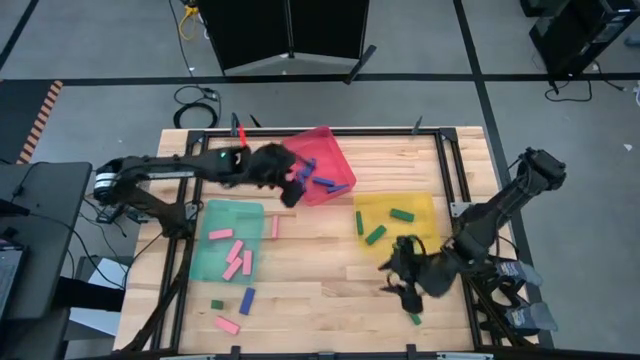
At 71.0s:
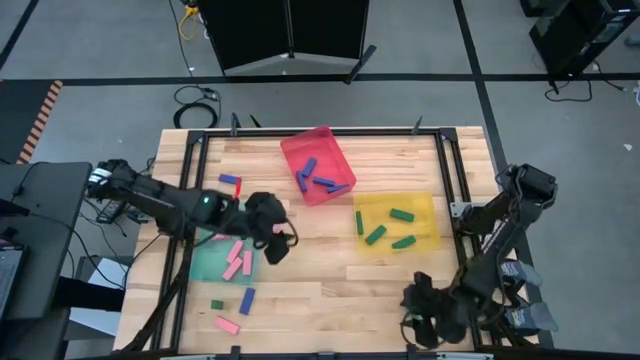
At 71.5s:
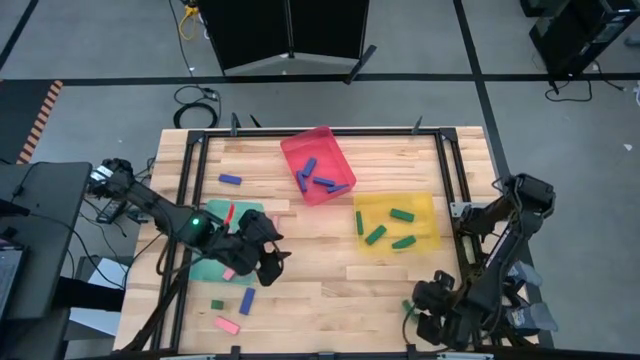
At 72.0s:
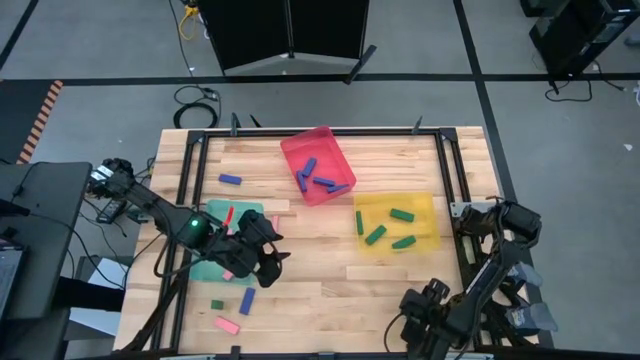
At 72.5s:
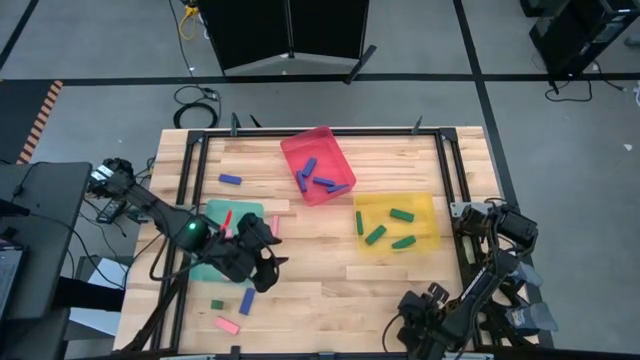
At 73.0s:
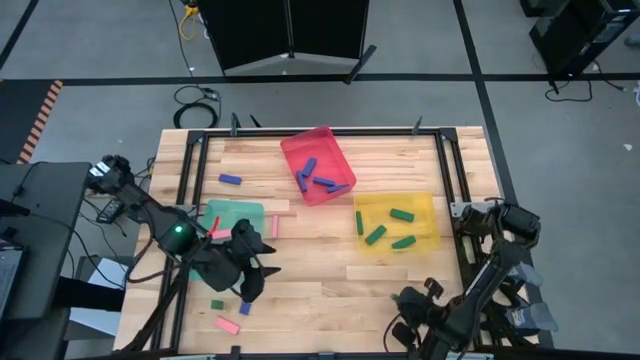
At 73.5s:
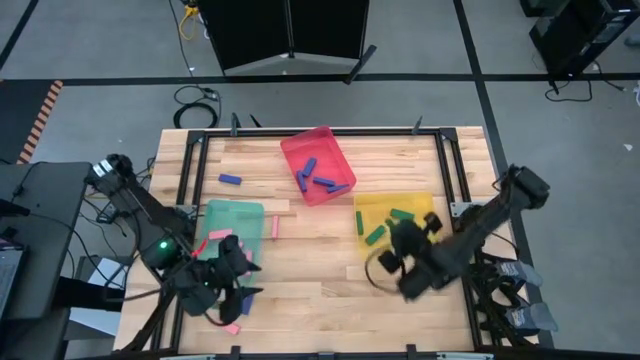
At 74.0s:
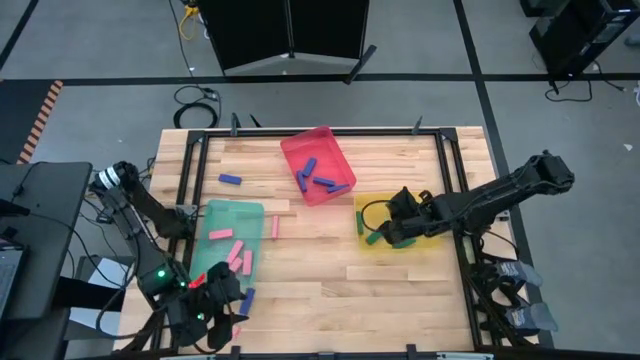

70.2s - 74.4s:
Task: Sort blocks
Put the green block into the yellow bin

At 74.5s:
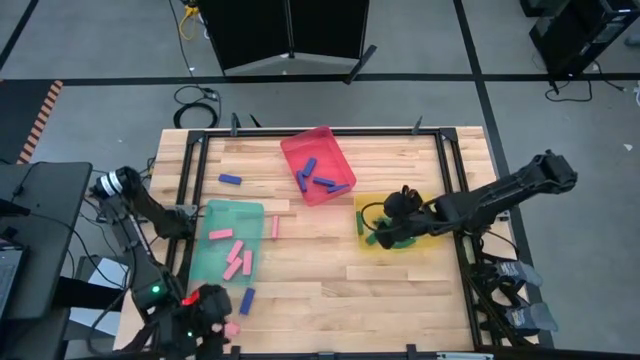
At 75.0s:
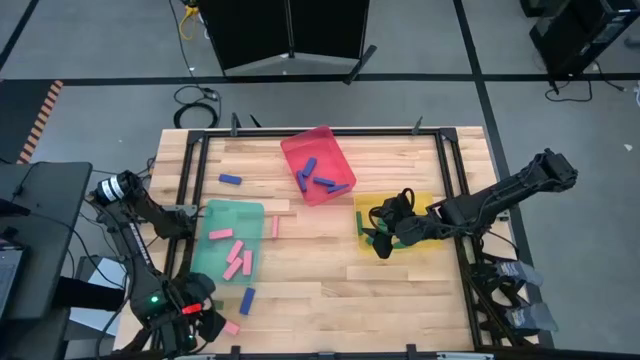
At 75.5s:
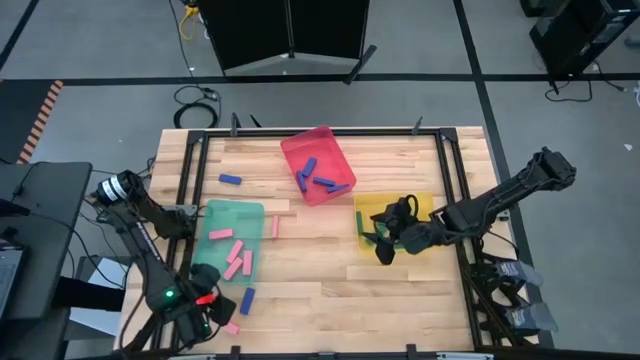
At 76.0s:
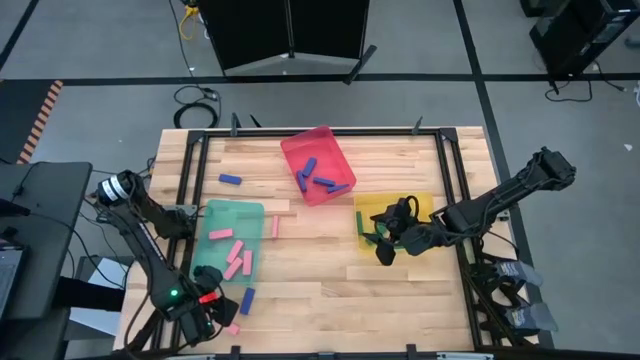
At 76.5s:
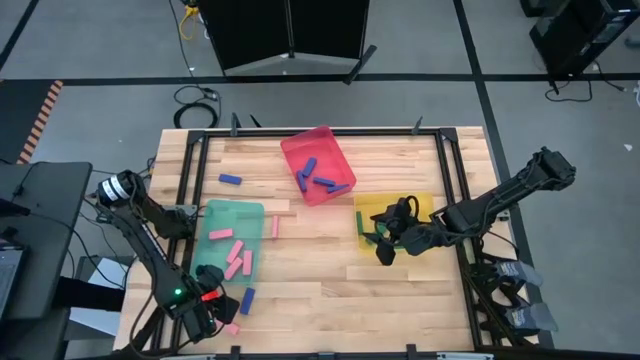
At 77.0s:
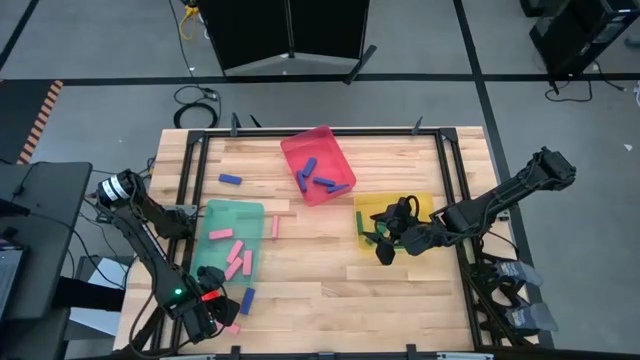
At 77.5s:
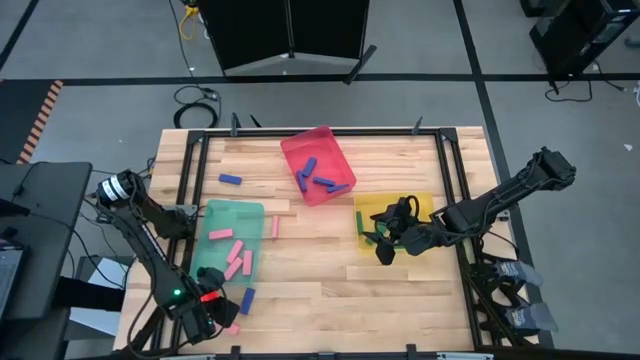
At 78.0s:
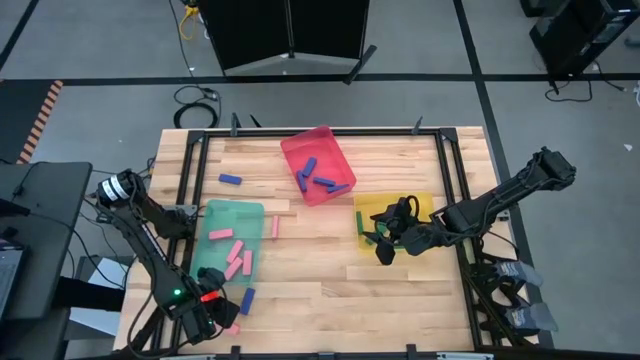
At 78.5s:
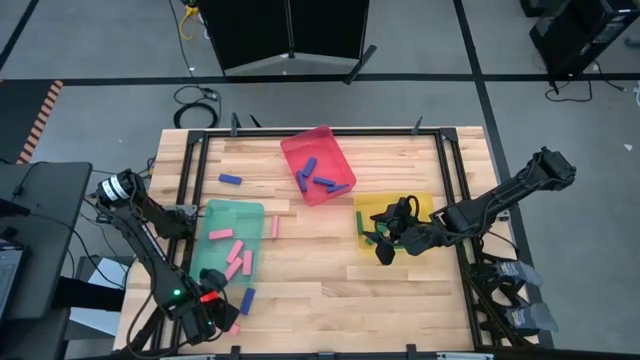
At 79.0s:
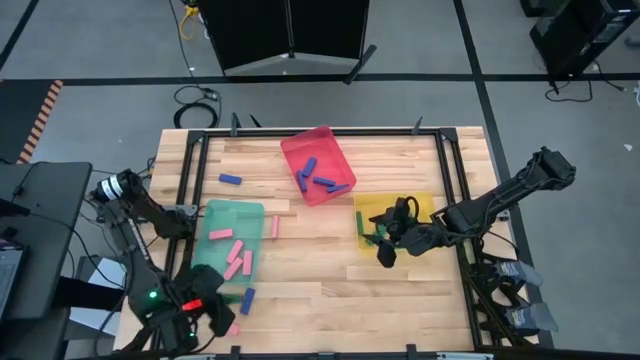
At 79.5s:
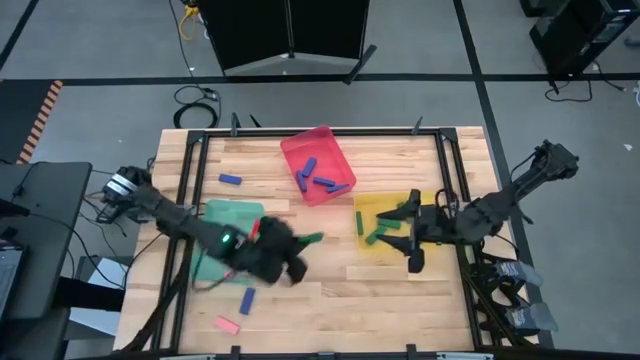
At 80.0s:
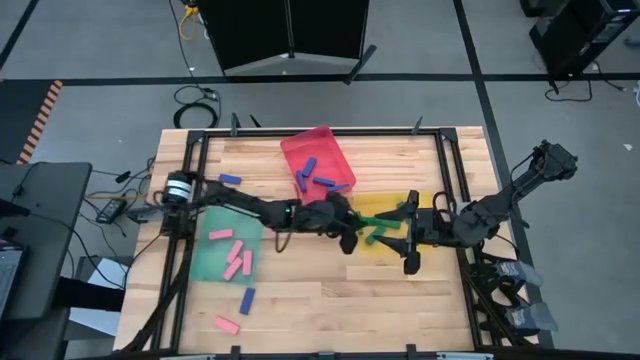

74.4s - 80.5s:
Put the green block into the yellow bin

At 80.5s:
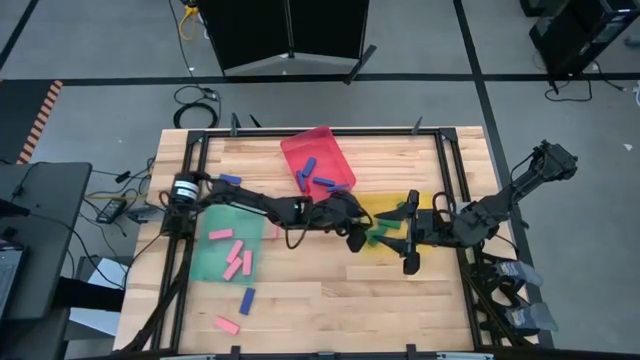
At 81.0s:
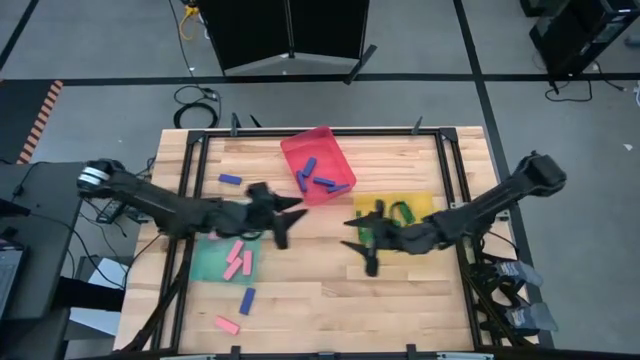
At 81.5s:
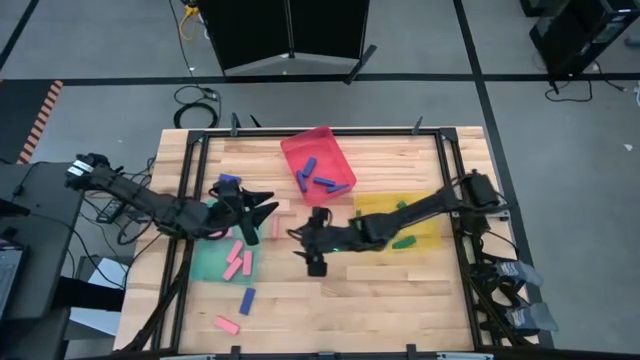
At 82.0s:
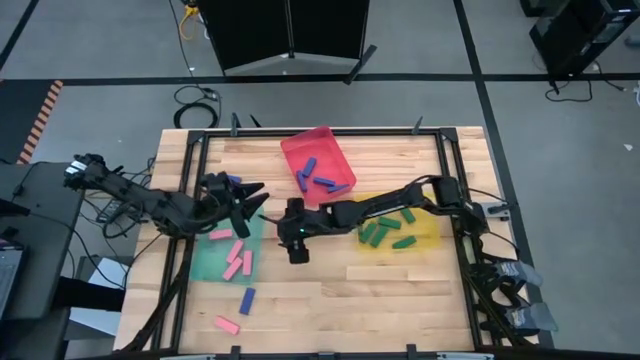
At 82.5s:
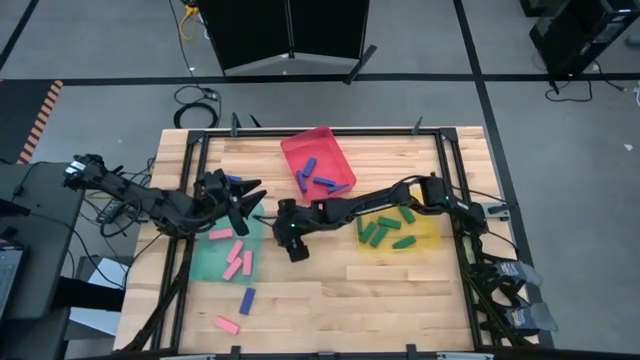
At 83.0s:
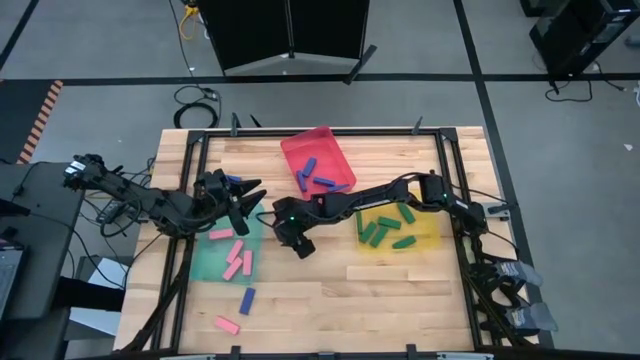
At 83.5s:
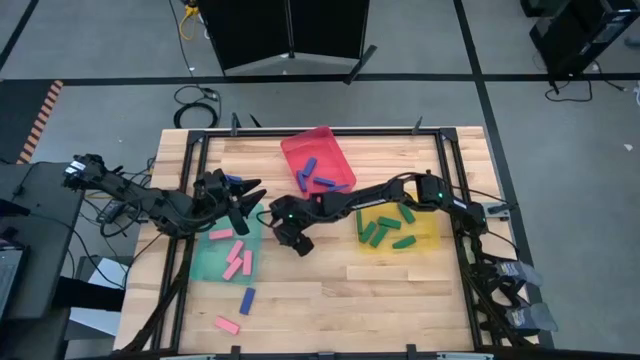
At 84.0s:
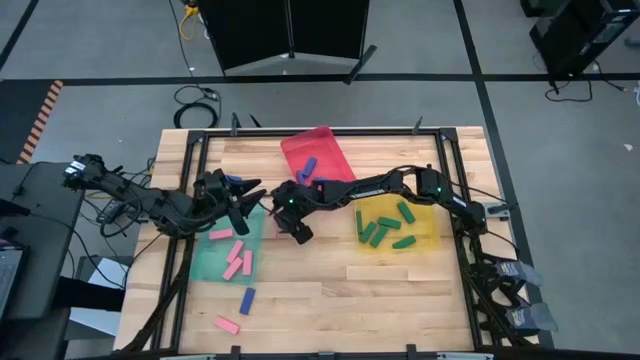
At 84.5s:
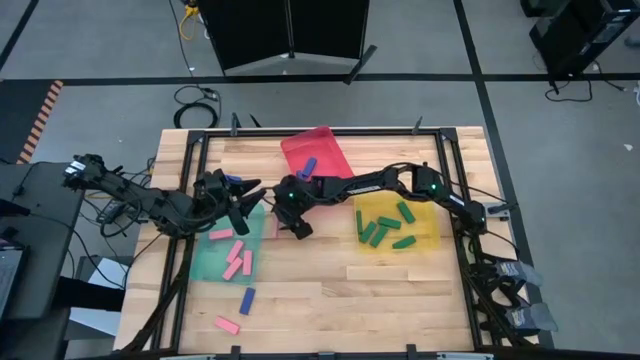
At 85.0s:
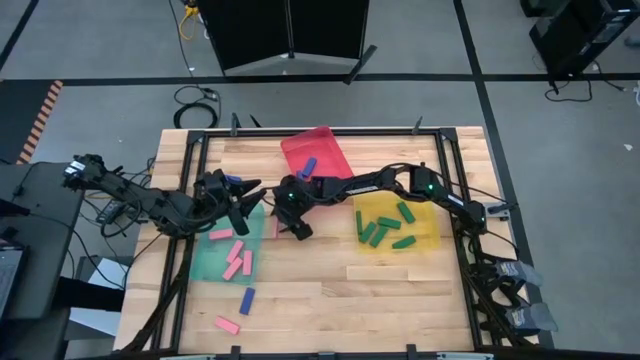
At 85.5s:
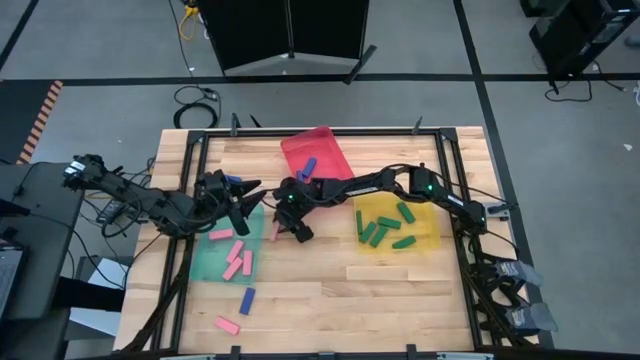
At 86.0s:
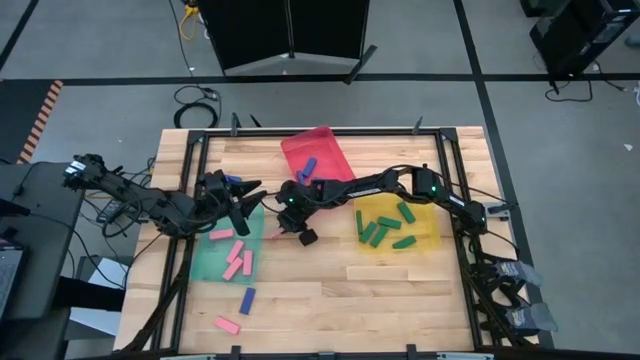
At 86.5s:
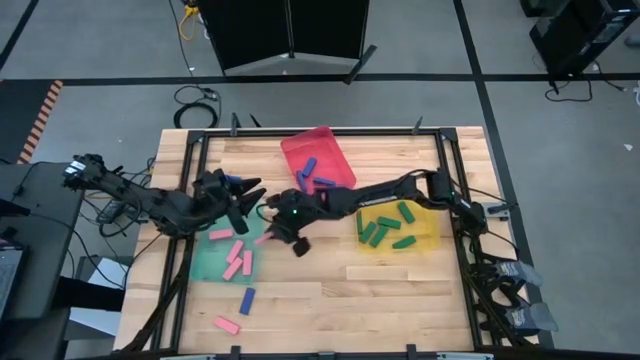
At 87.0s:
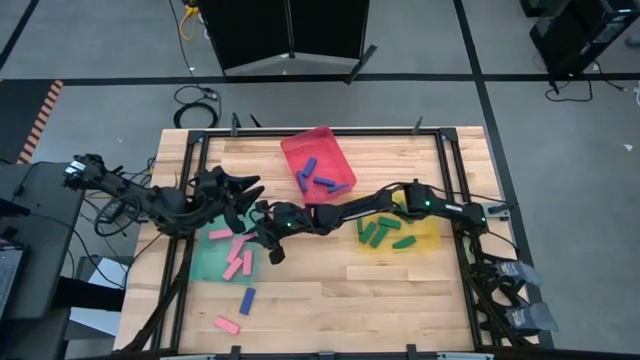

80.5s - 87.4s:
Put the pink block into the green bin

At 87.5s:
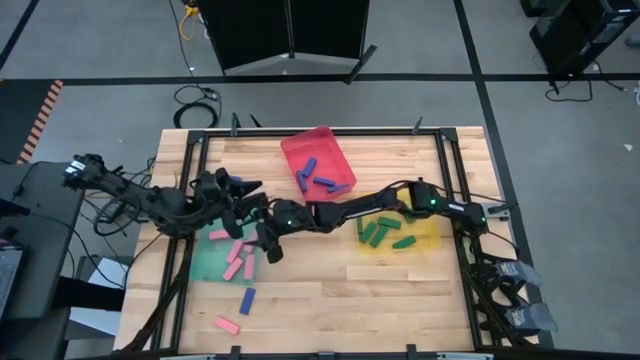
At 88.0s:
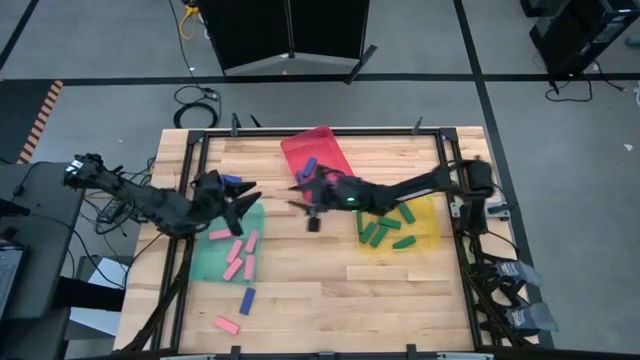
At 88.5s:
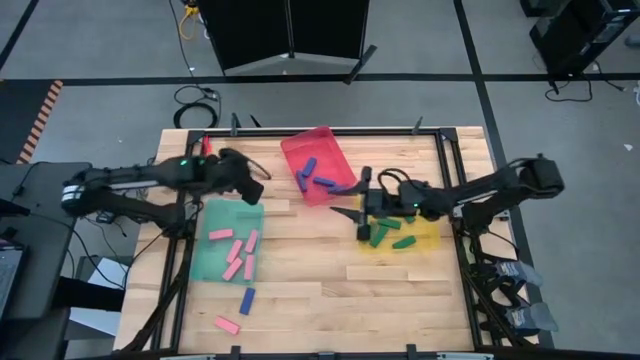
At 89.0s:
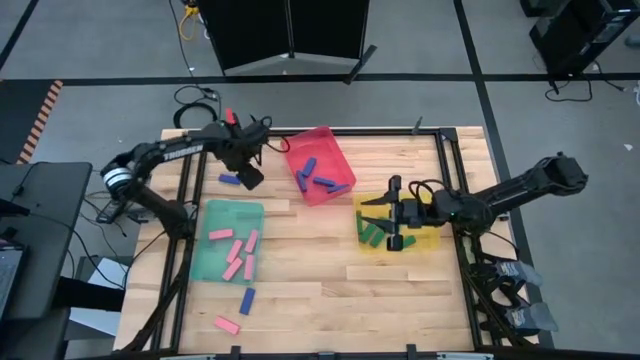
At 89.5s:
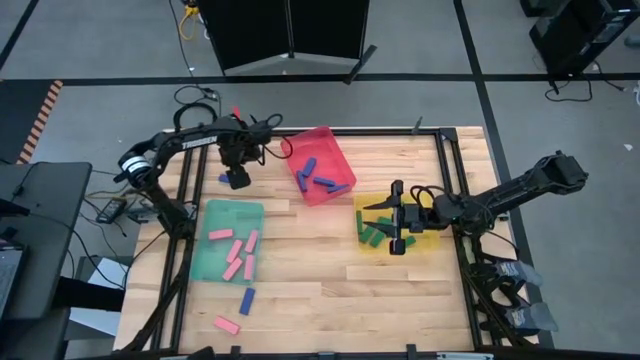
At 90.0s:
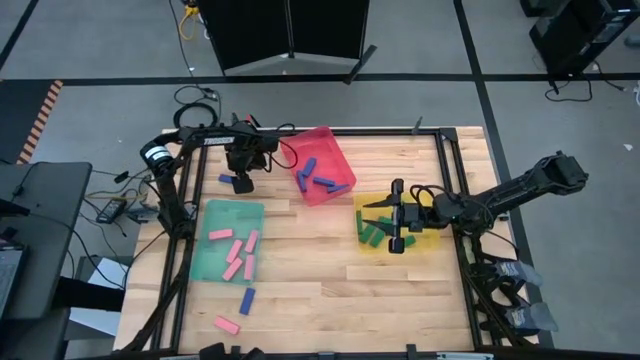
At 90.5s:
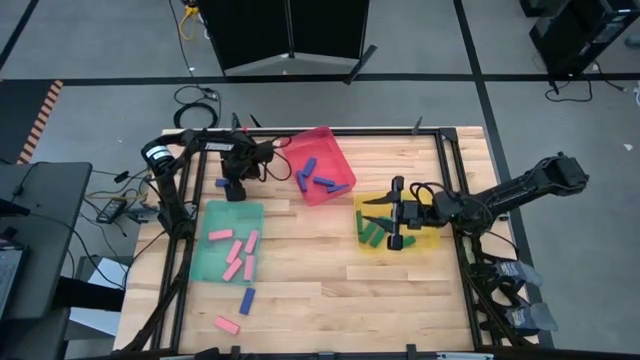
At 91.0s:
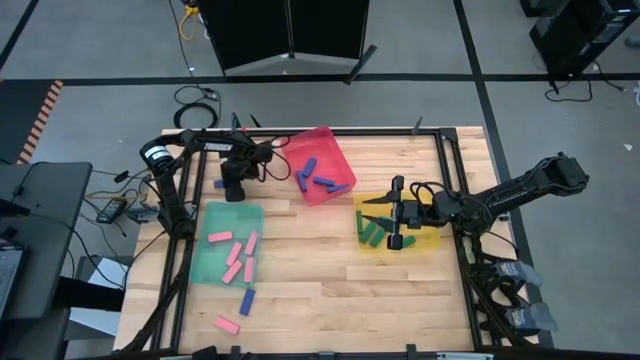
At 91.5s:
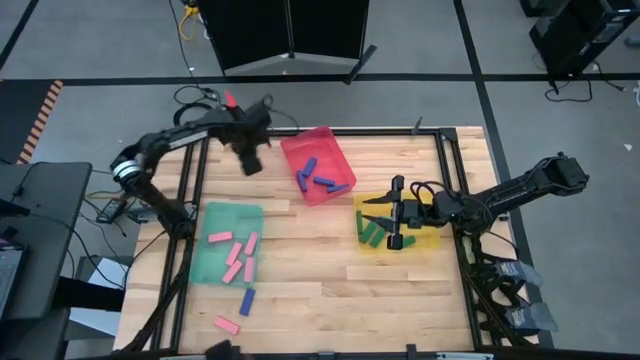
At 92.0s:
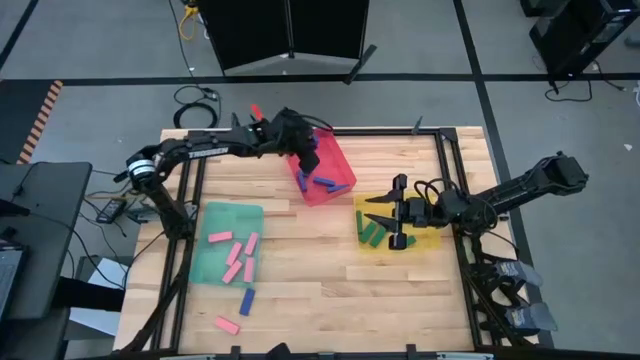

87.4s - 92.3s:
Put the blue block into the red bin
